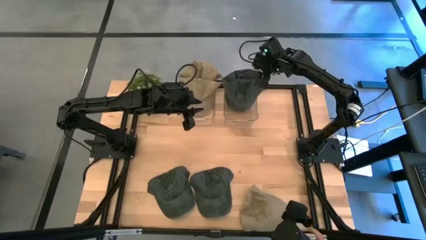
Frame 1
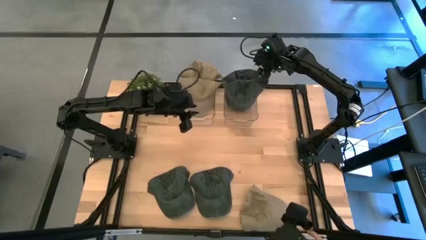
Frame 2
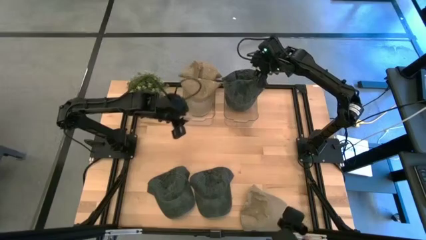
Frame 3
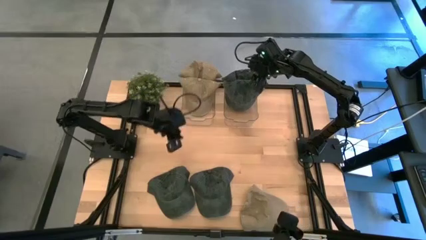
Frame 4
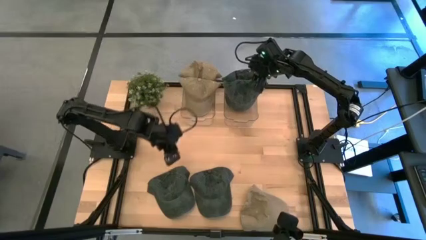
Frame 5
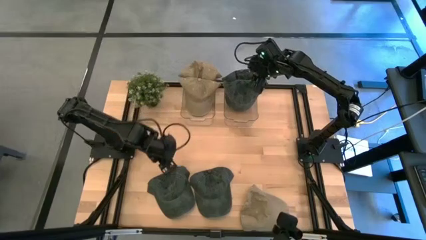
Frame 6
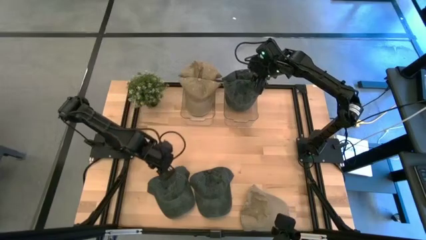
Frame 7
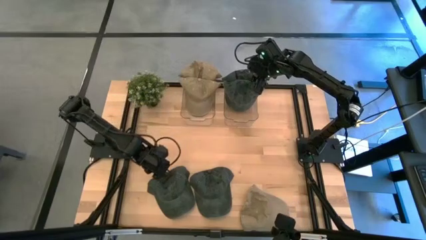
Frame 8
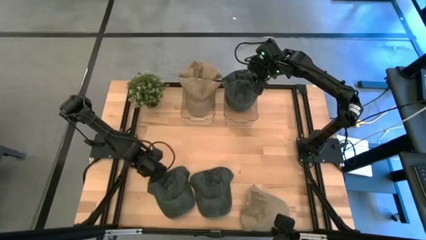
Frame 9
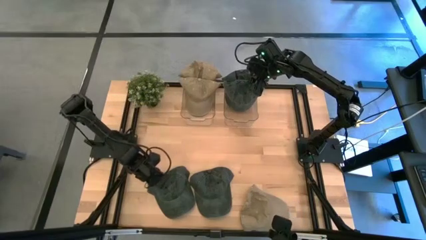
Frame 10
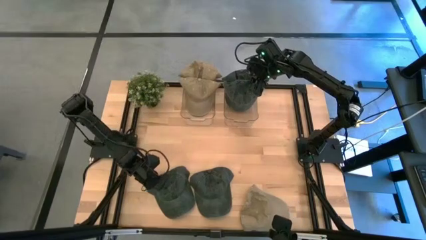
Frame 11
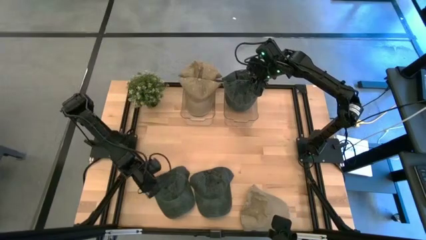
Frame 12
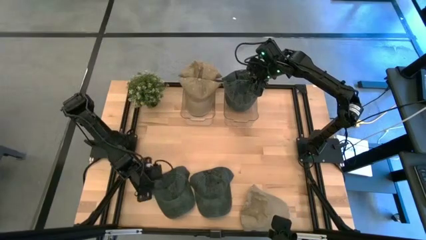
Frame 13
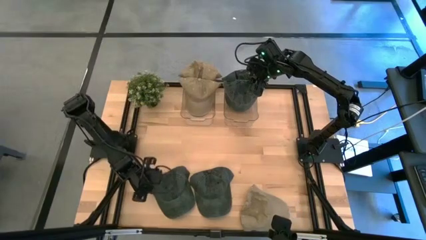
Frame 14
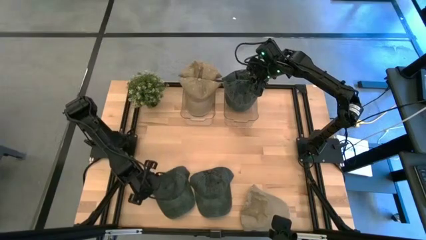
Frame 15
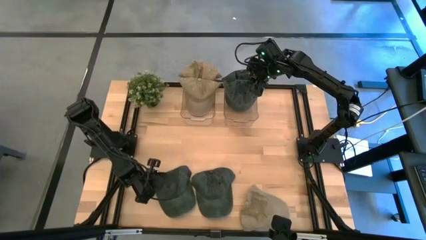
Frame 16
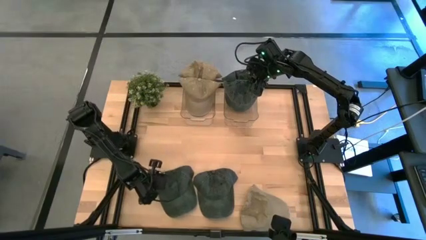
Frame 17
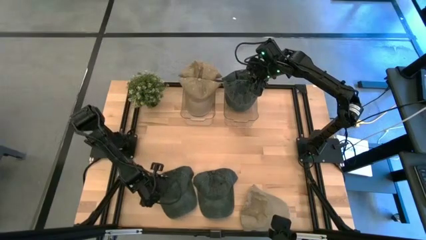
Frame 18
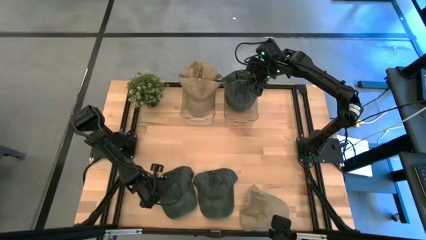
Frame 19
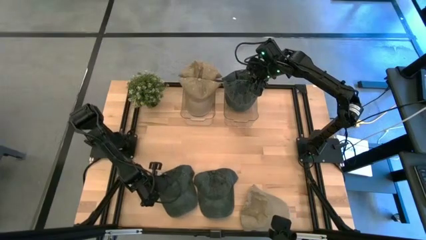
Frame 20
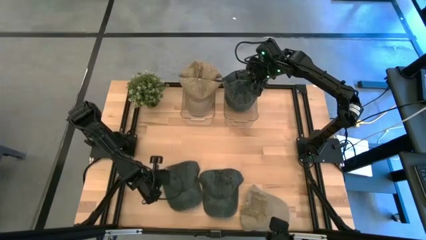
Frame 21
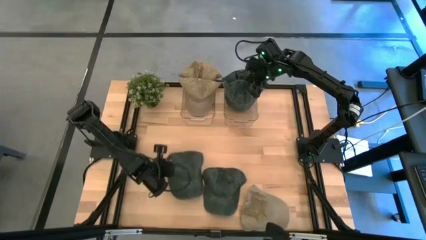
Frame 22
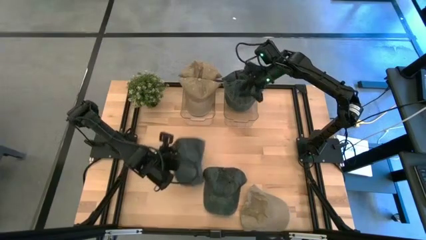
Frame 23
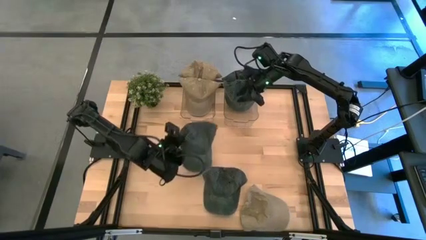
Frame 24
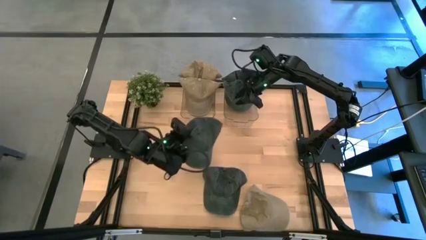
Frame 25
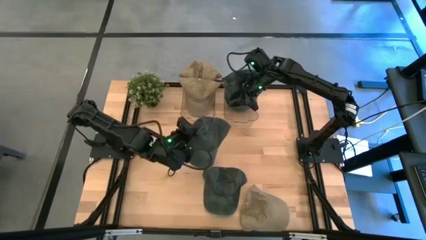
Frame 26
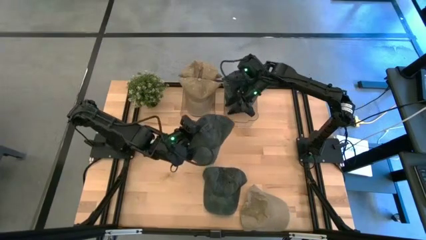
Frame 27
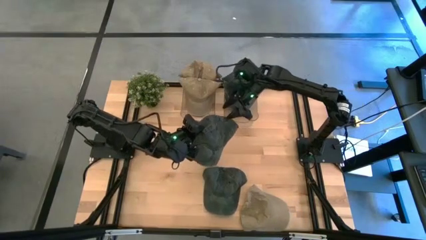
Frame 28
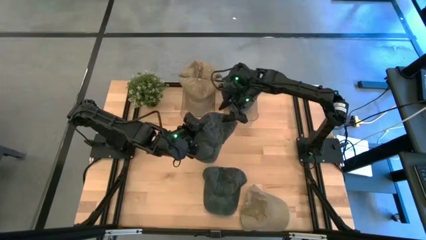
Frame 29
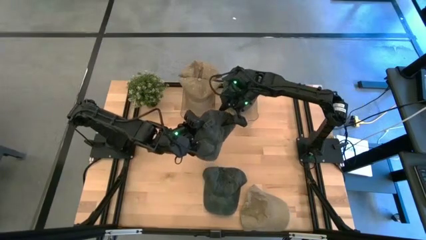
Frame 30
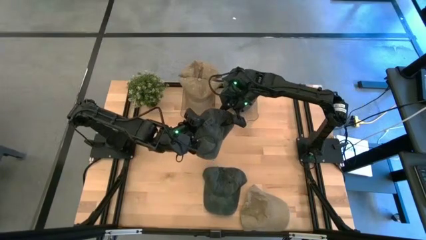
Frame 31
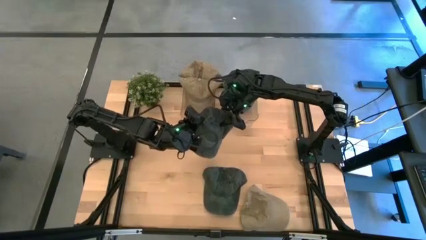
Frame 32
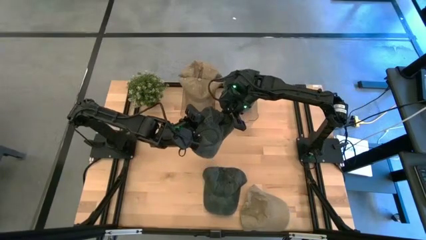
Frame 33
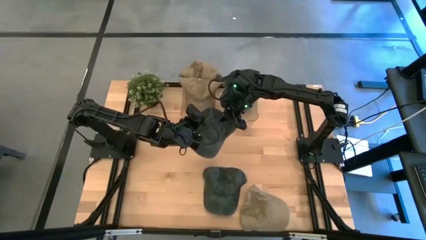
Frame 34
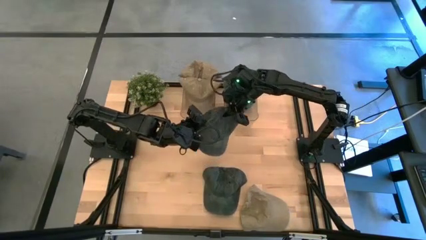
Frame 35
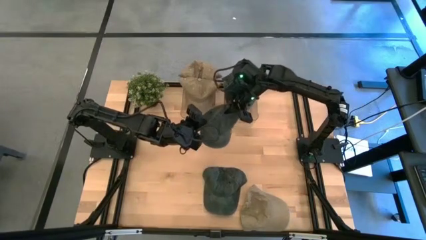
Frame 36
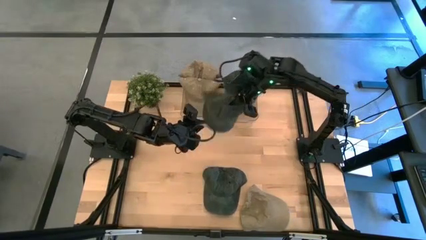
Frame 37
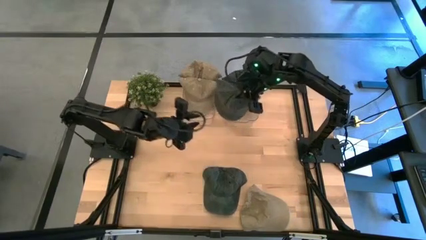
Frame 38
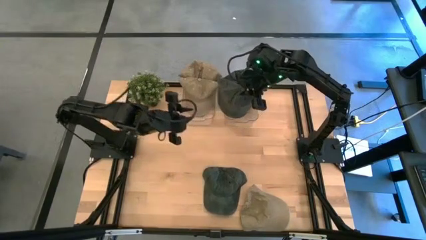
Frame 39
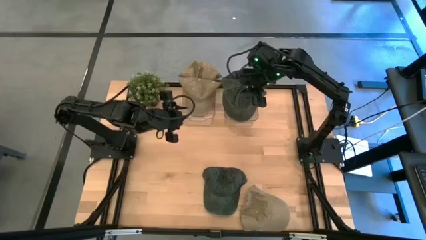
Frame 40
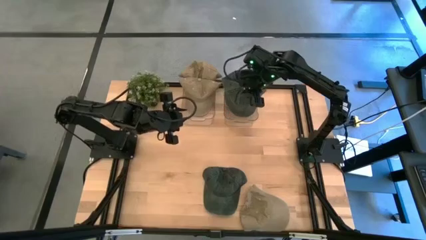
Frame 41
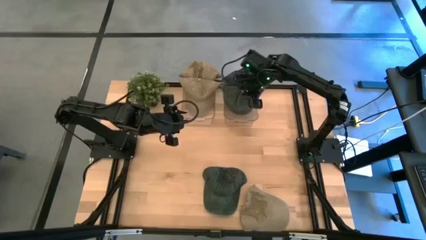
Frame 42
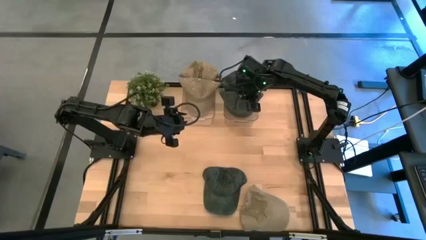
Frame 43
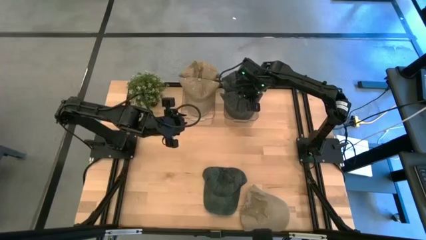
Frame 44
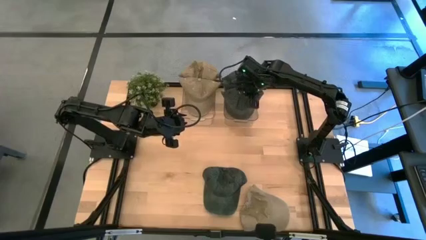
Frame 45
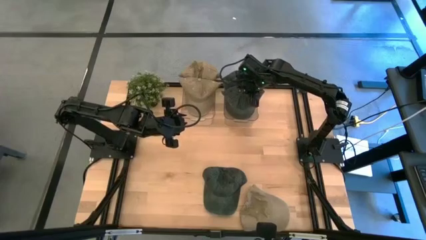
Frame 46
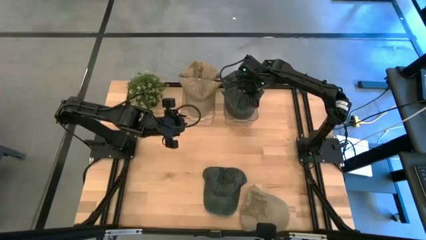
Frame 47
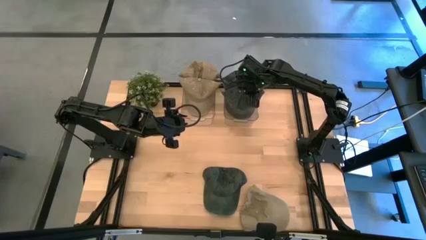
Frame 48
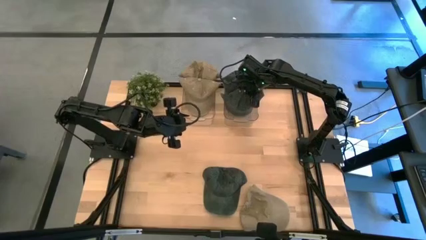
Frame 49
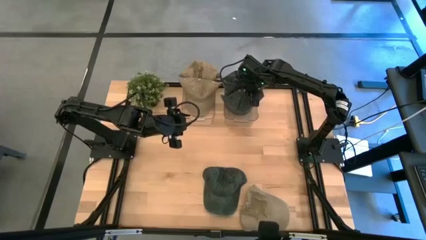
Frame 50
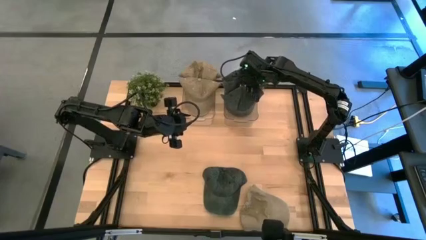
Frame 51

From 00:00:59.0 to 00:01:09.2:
Task: Pick & Place hat
Put the black cap into the right transparent bin

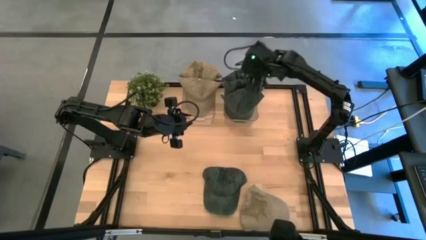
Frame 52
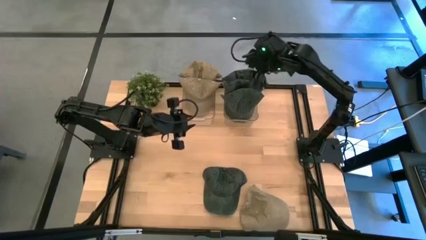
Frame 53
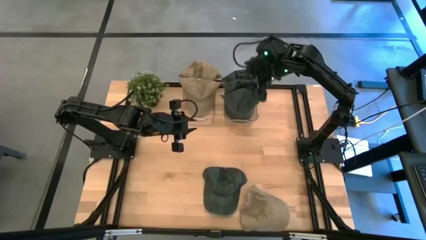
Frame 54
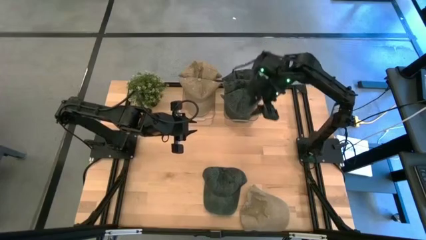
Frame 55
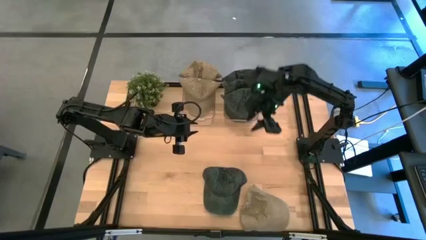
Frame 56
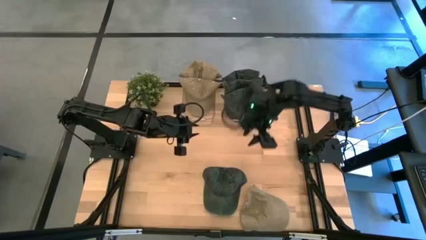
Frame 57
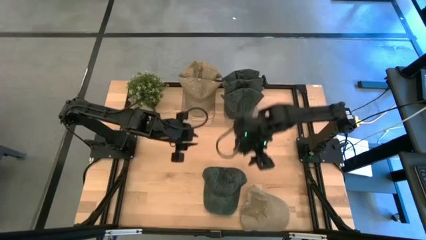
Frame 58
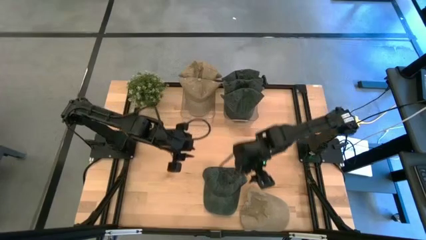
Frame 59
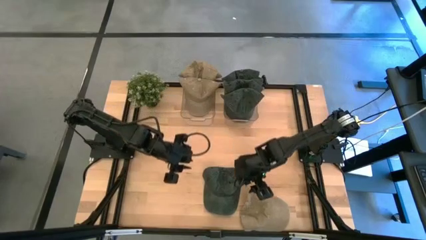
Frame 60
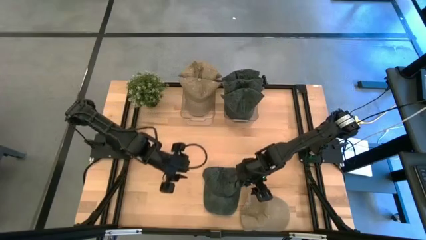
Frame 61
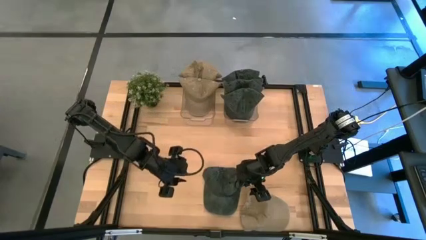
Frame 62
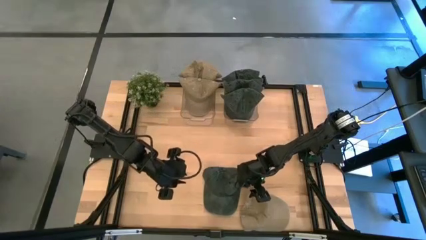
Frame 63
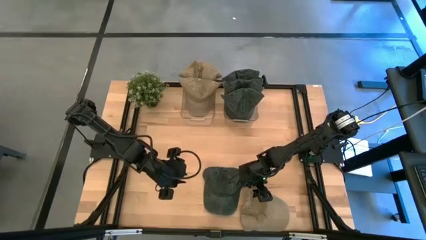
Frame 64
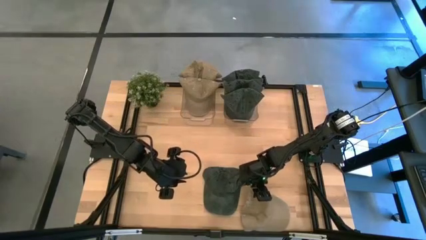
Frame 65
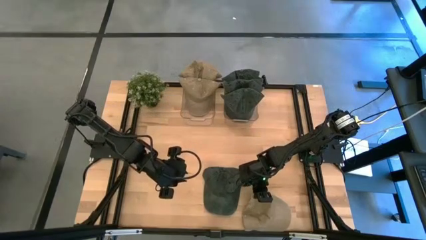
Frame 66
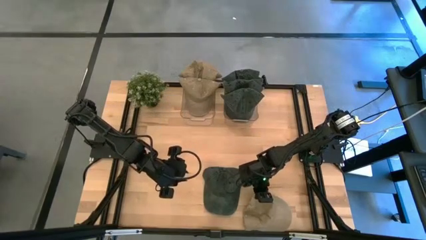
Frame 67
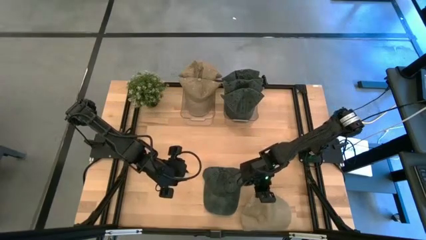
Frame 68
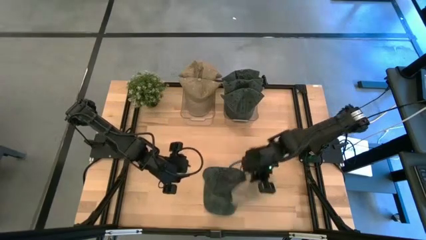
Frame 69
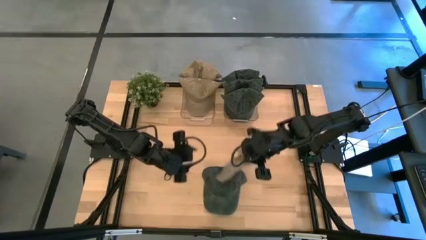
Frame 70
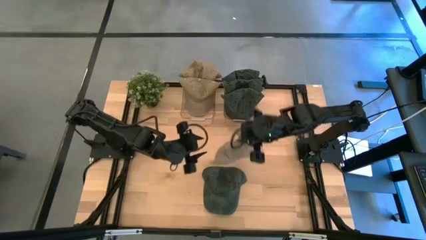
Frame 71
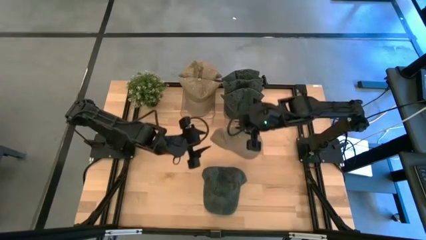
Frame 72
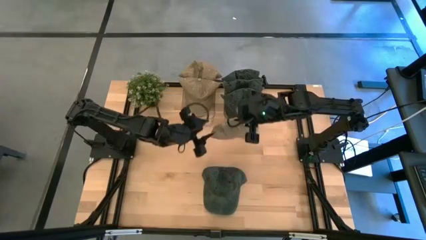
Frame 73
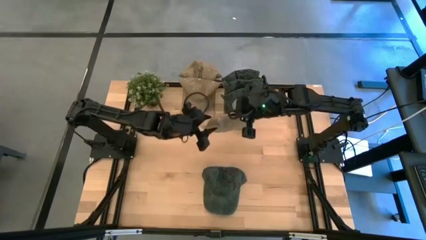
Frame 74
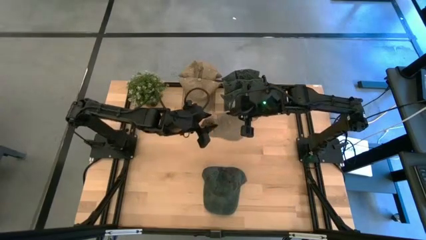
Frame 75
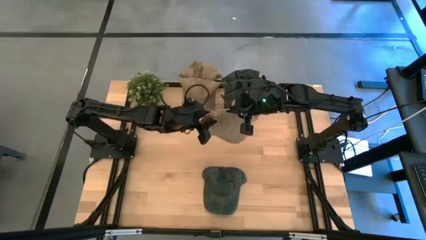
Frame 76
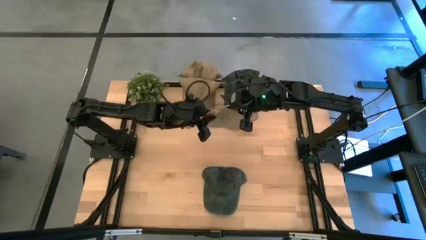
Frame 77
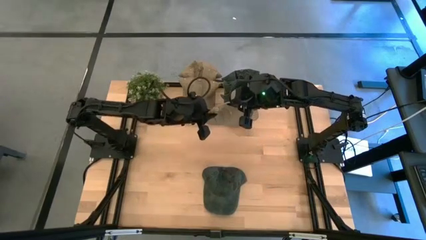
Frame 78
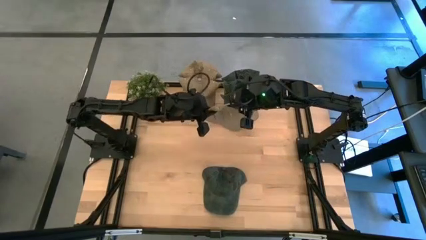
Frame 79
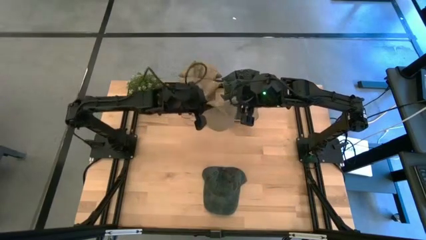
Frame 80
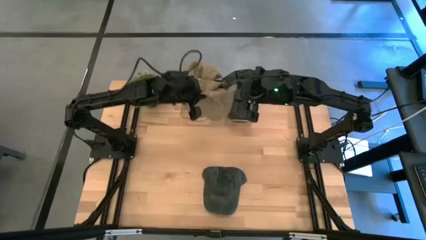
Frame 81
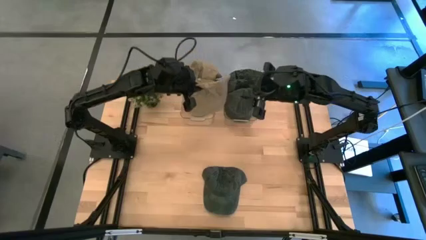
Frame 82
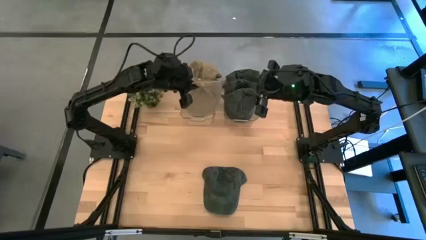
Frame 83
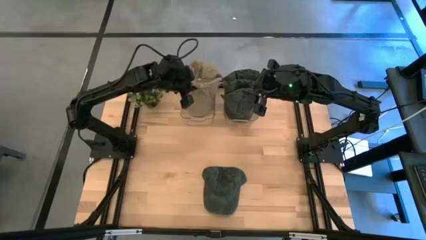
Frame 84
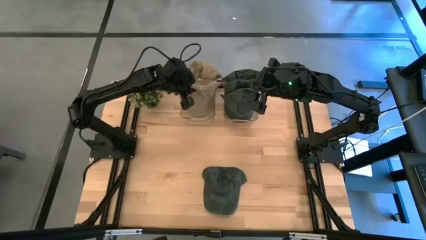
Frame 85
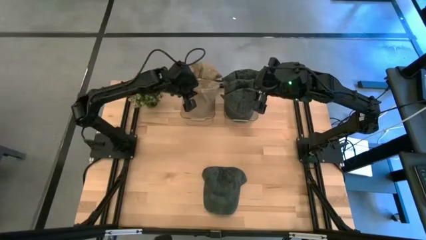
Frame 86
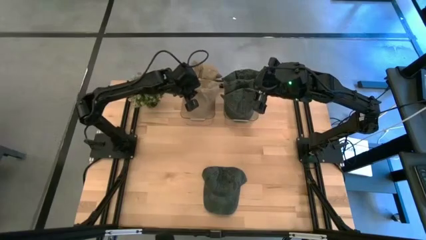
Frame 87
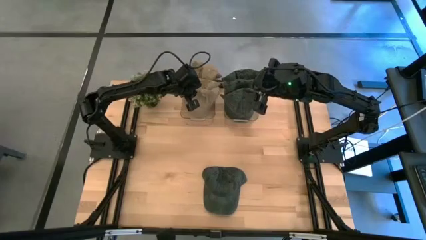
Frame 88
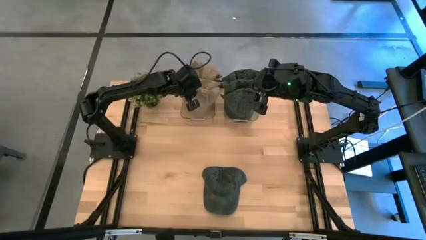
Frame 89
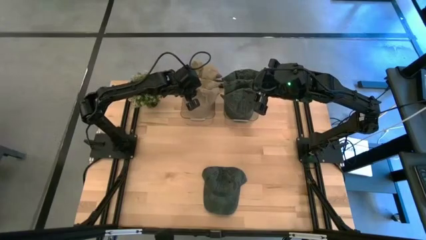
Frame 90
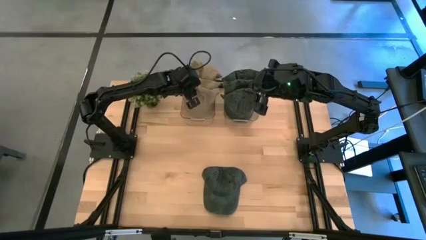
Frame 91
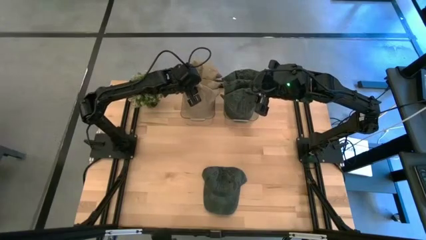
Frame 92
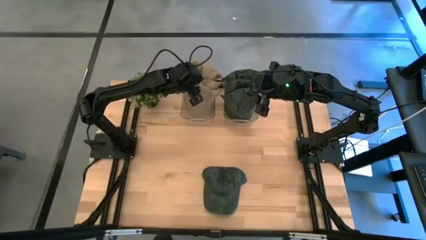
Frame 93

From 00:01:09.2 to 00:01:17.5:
Put the brown cap into the left transparent bin
